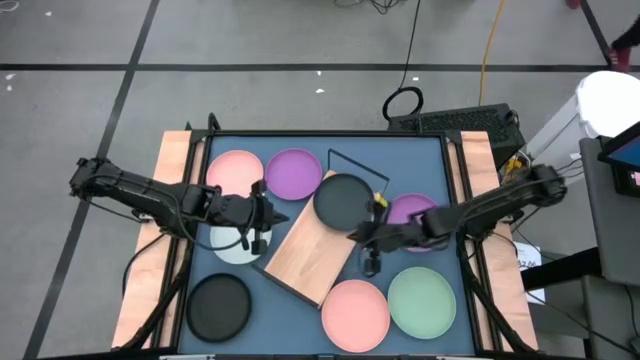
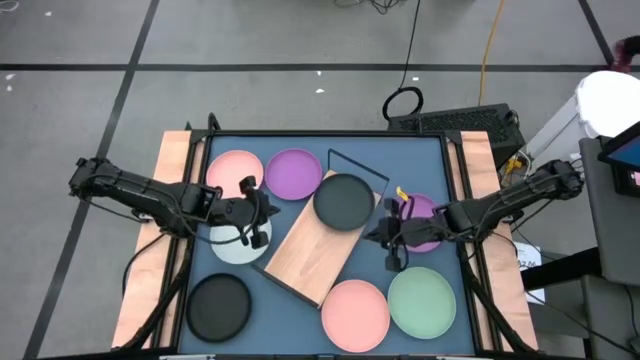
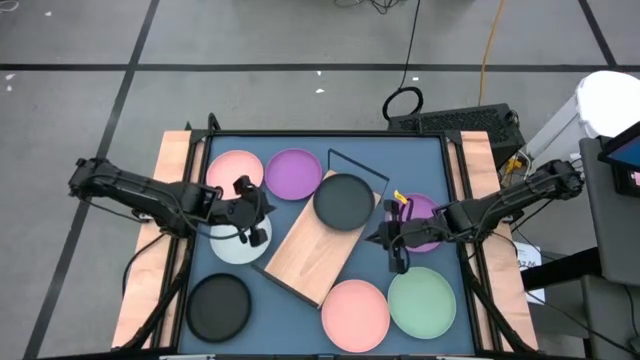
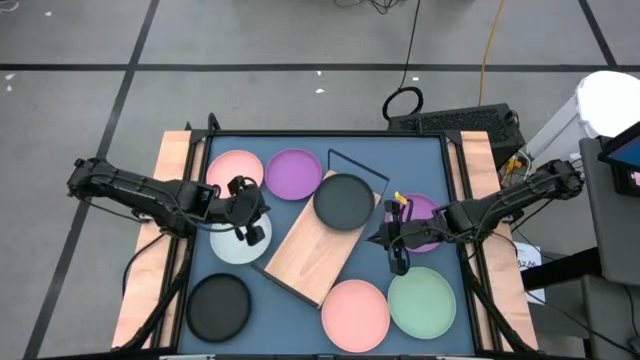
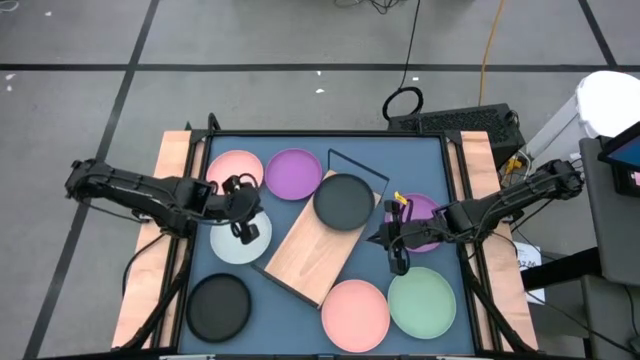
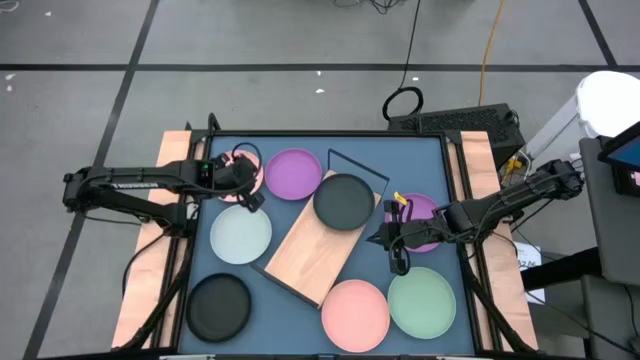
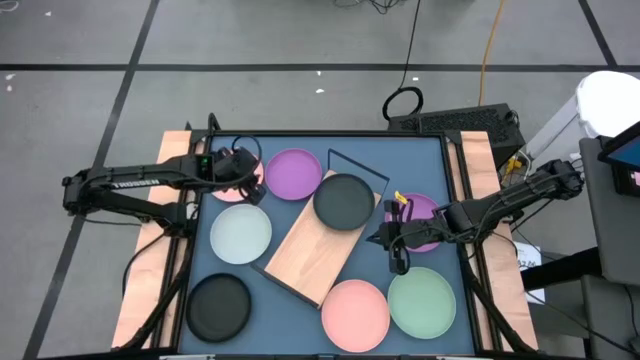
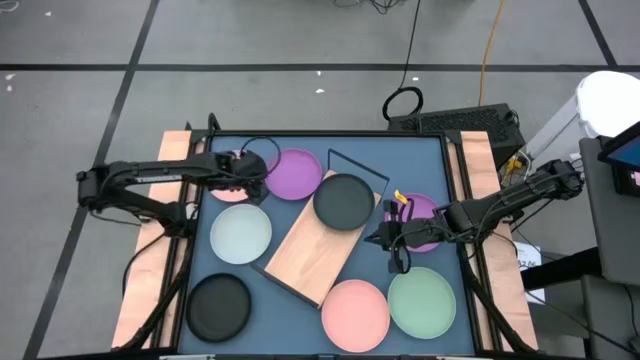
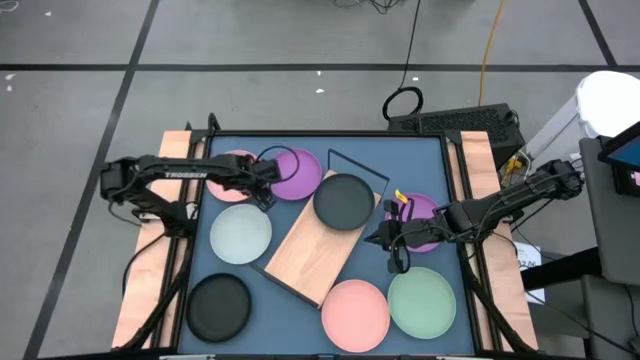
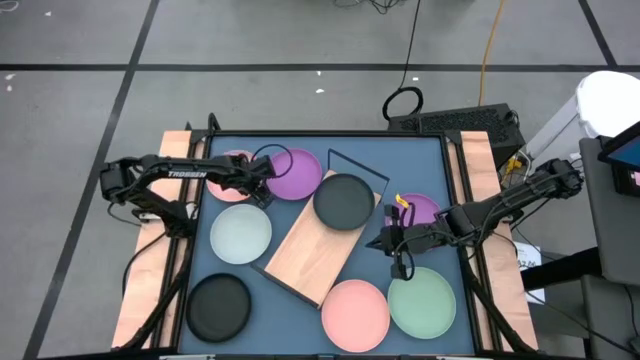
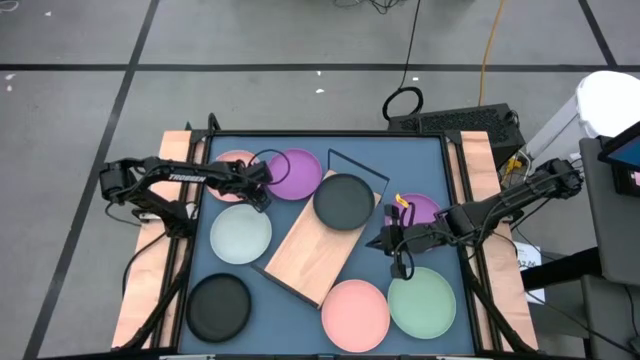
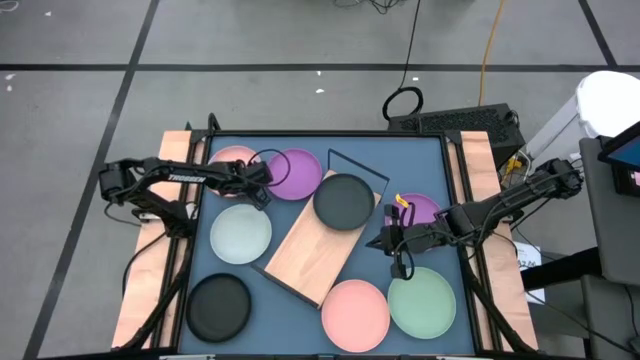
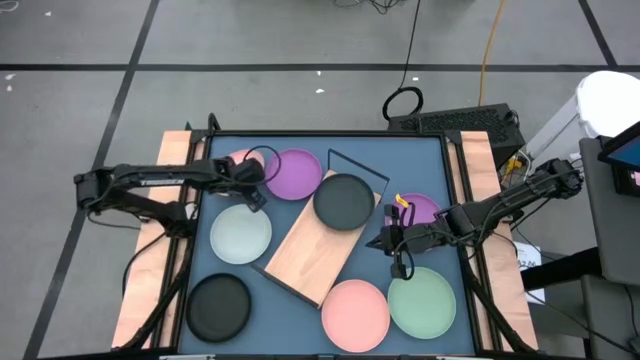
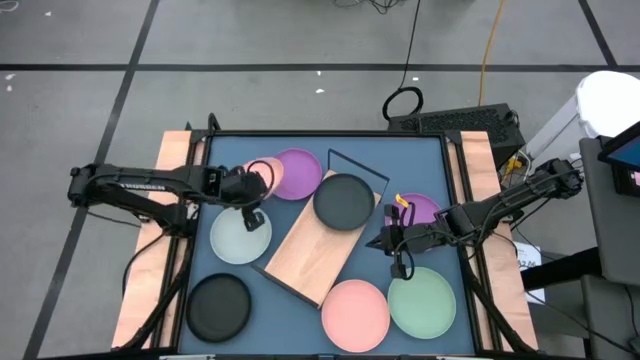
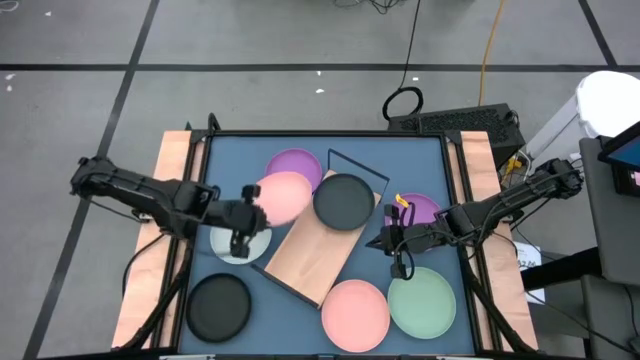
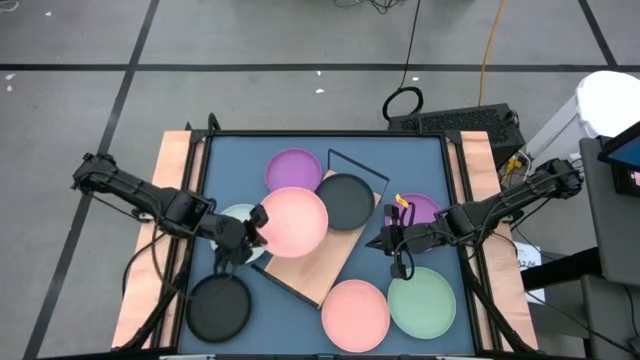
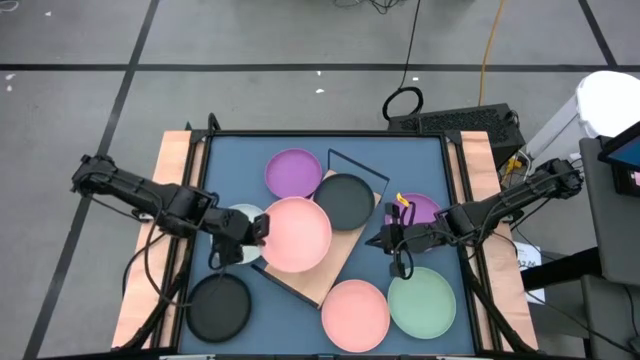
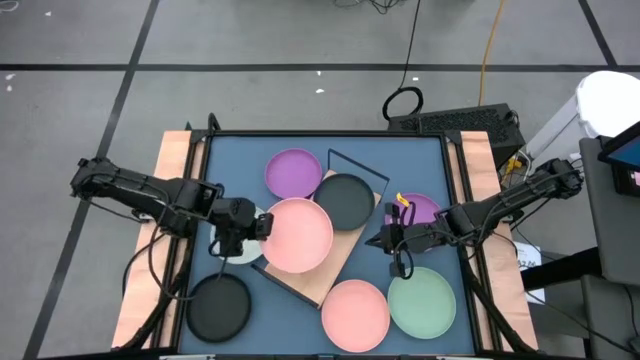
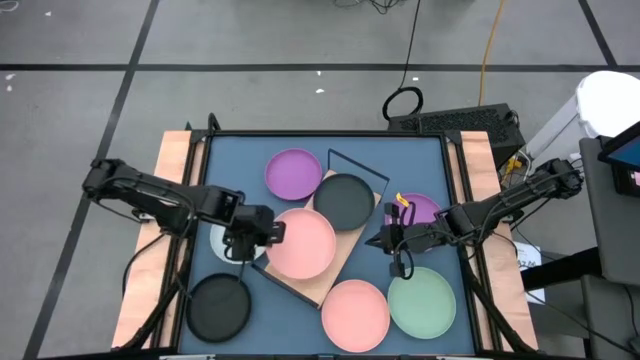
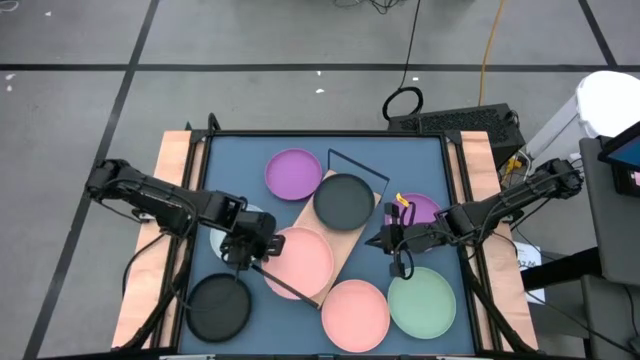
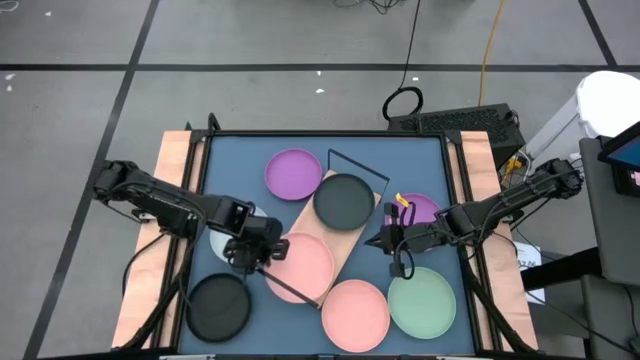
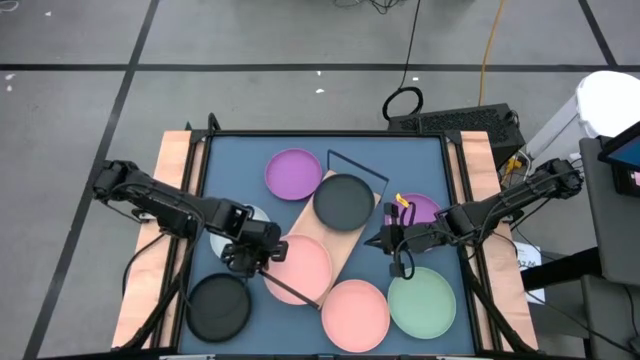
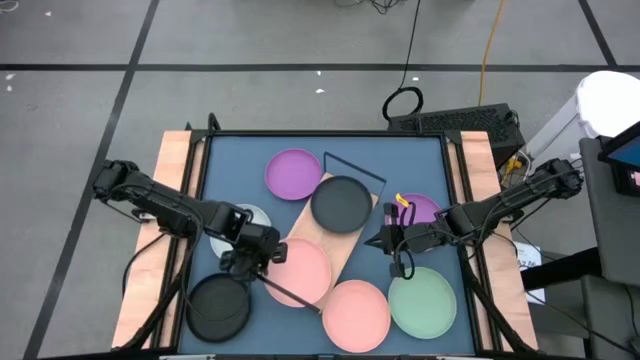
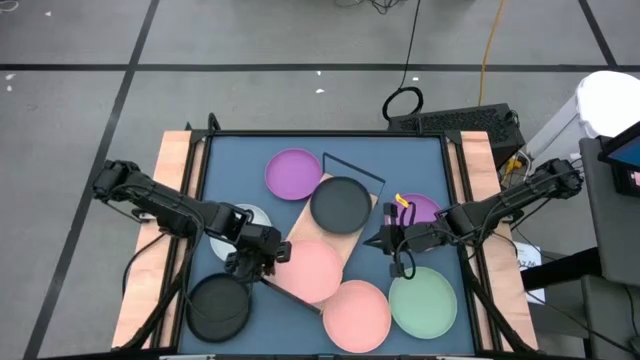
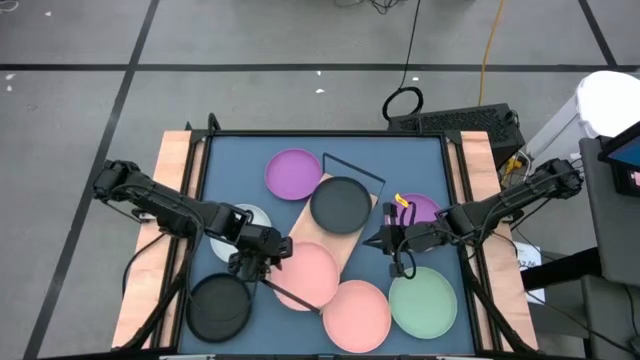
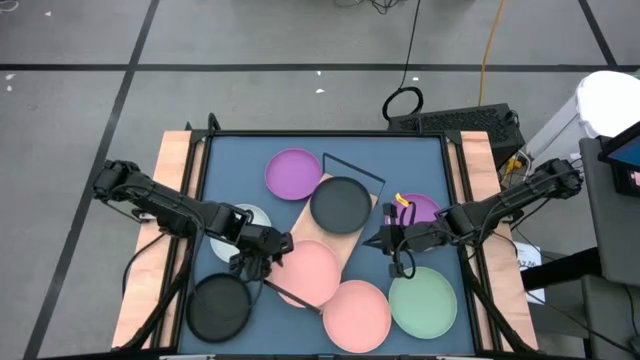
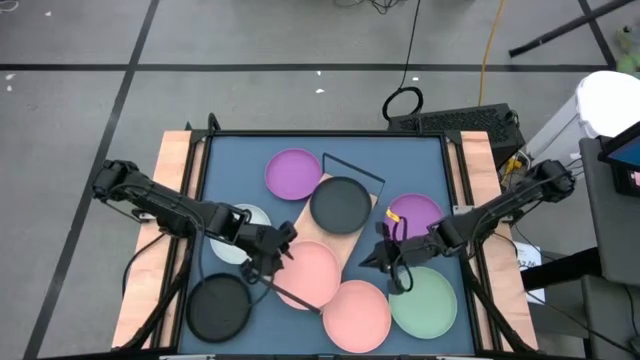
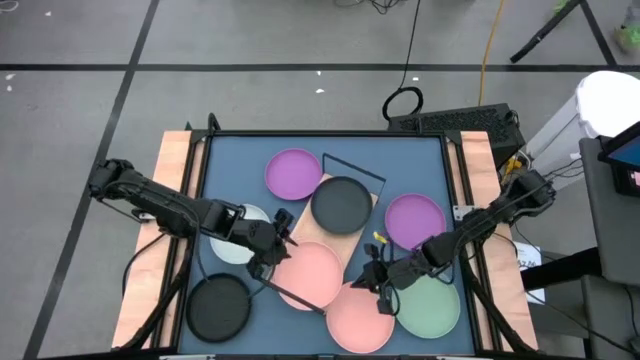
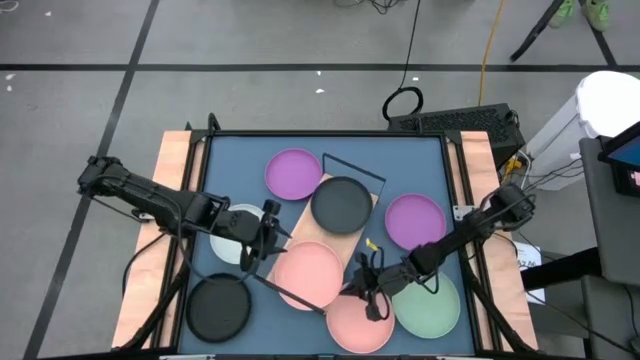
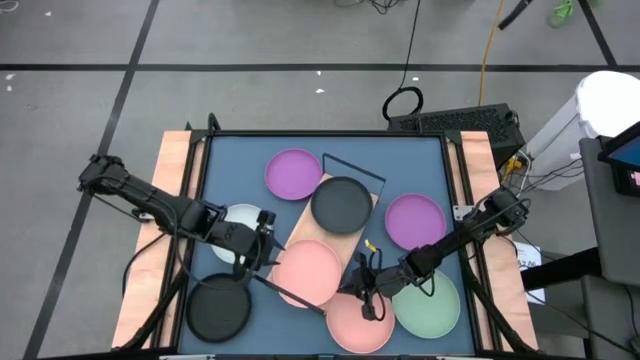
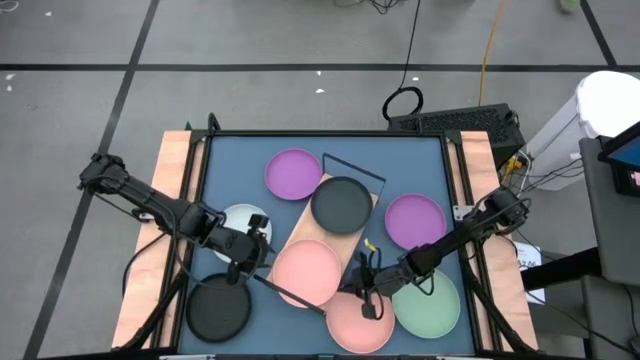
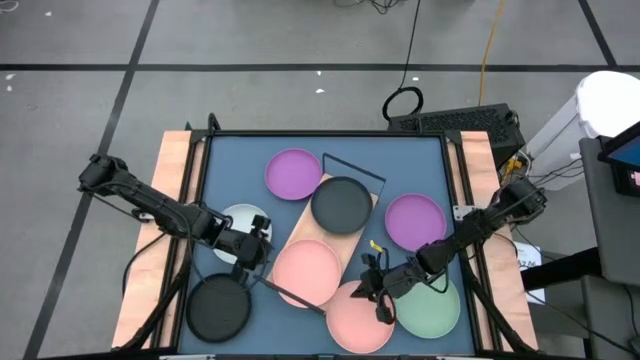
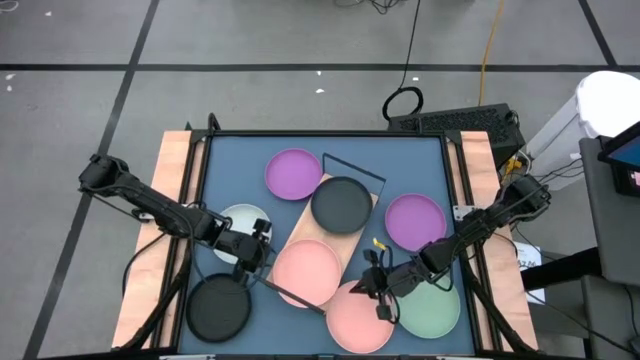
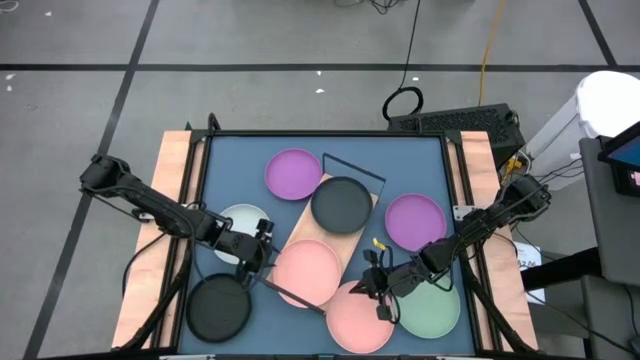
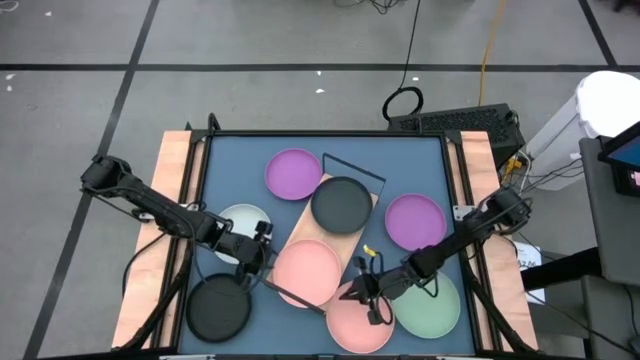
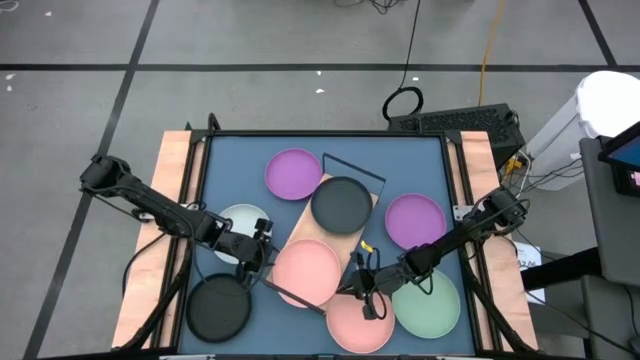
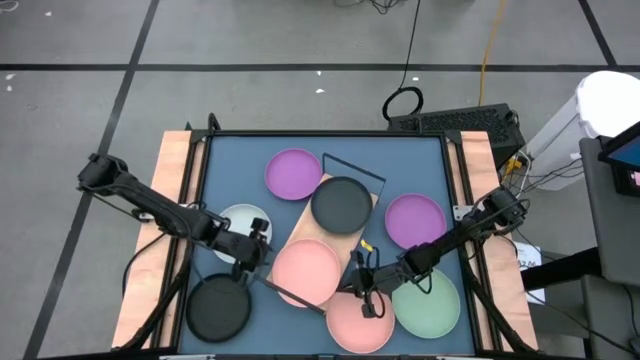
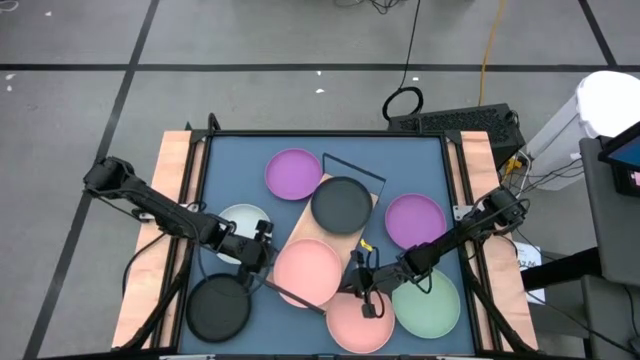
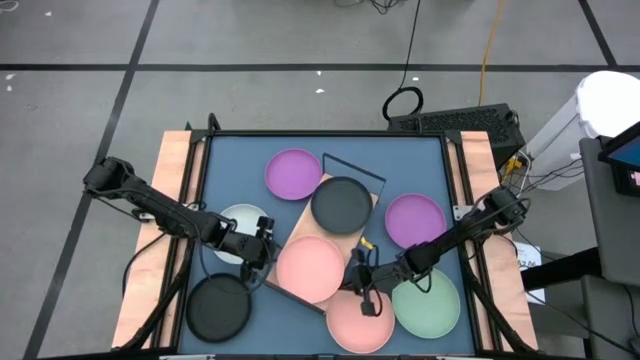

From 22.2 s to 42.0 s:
Task: Place and stack plates onto a shelf
Put the top pink plate on the shelf

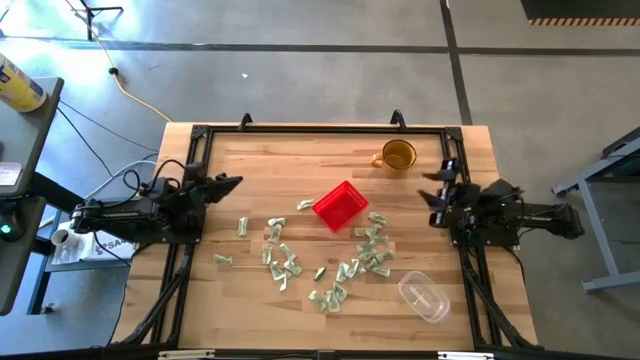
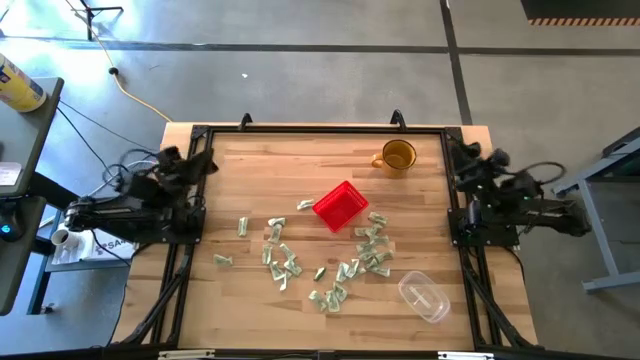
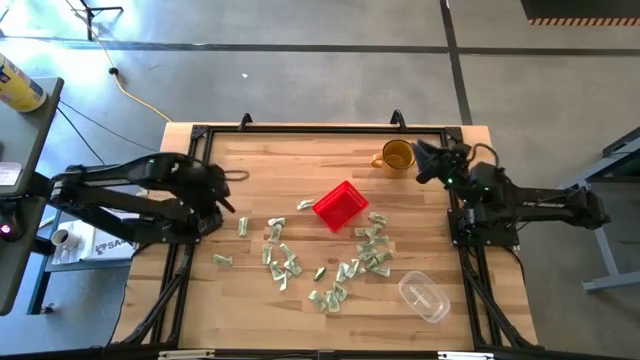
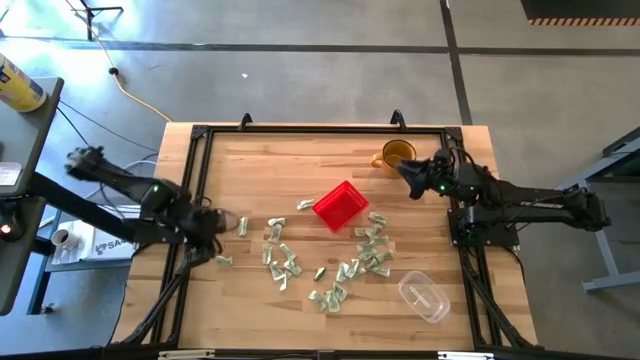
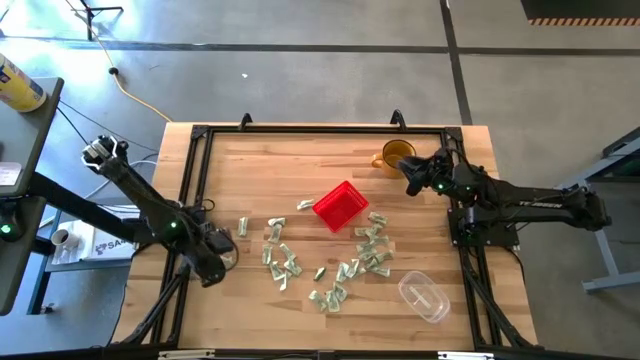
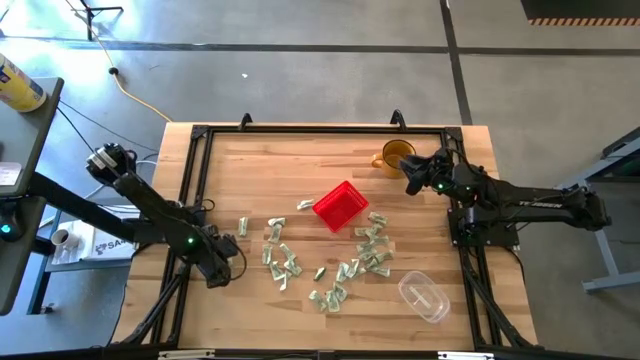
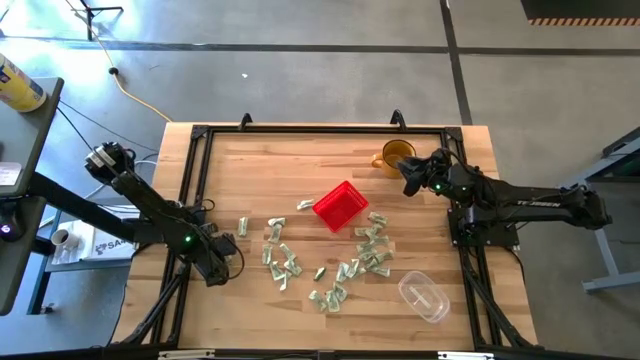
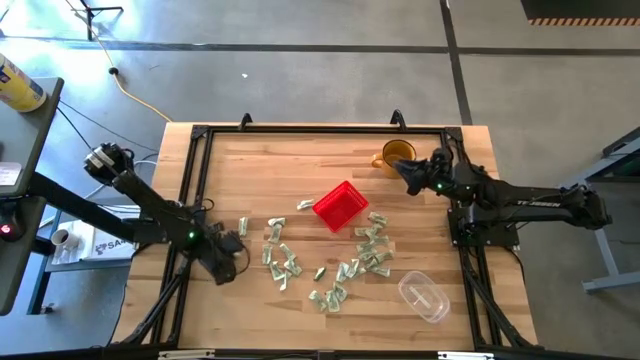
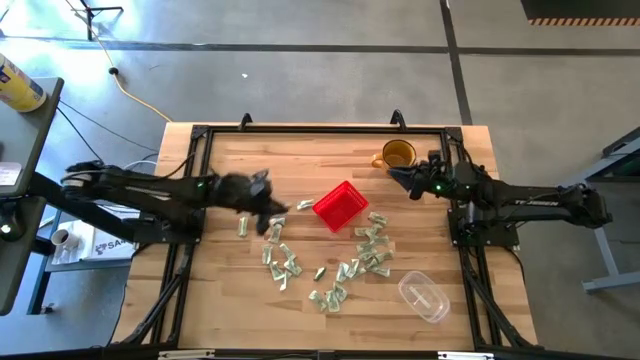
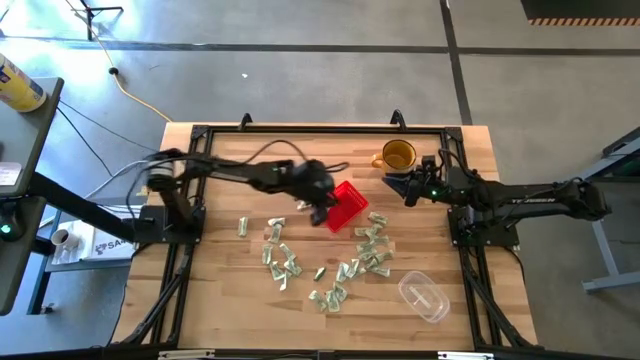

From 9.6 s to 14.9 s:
Task: Pick and place items into bin
Put the white stevia packet into the red bin
